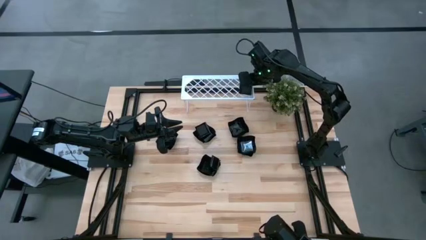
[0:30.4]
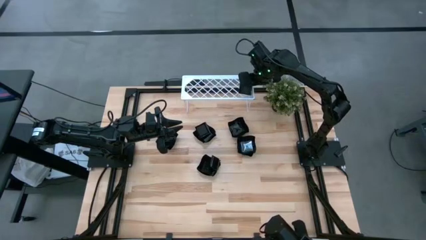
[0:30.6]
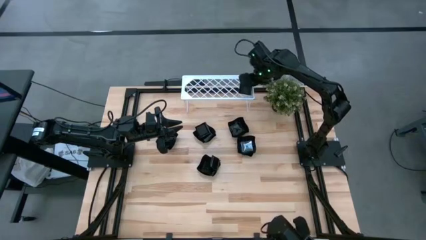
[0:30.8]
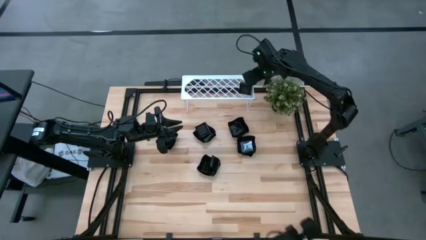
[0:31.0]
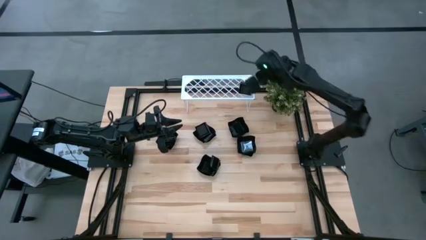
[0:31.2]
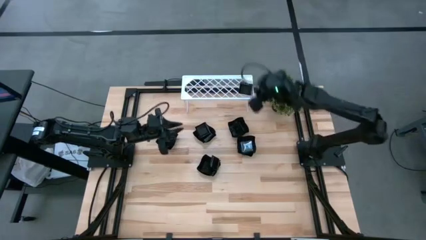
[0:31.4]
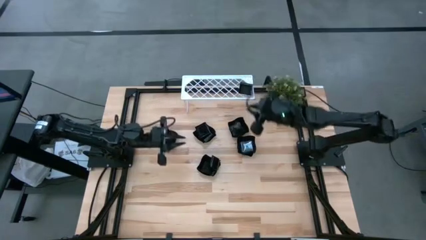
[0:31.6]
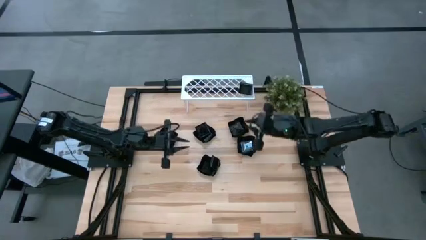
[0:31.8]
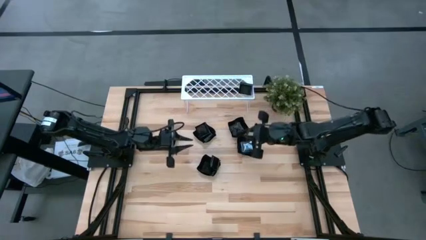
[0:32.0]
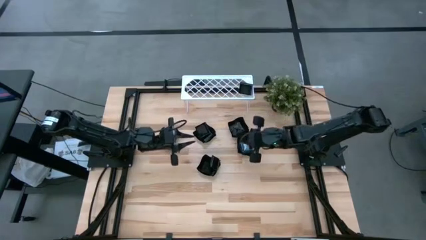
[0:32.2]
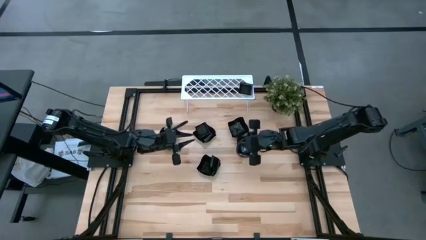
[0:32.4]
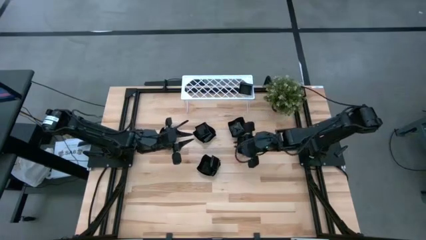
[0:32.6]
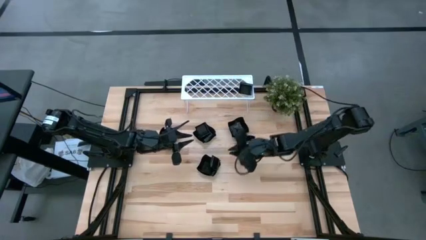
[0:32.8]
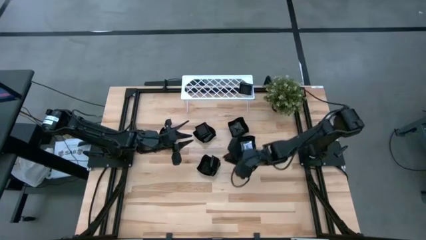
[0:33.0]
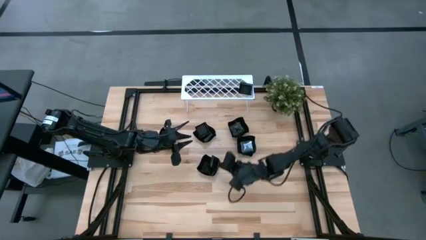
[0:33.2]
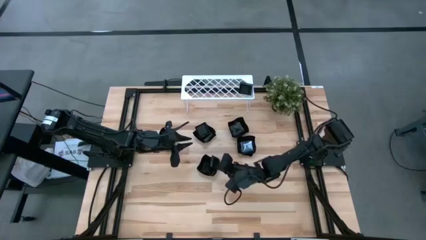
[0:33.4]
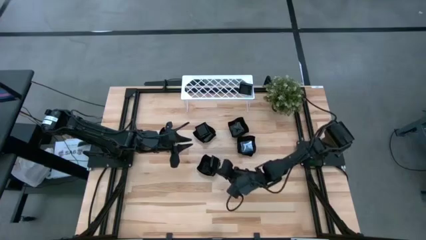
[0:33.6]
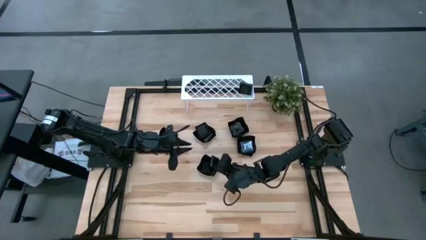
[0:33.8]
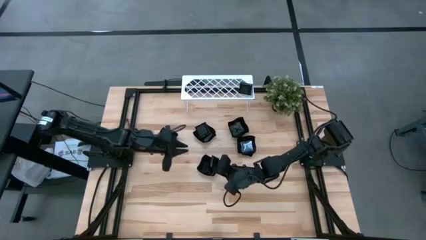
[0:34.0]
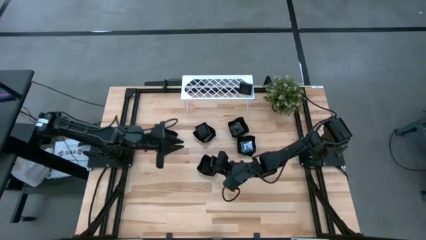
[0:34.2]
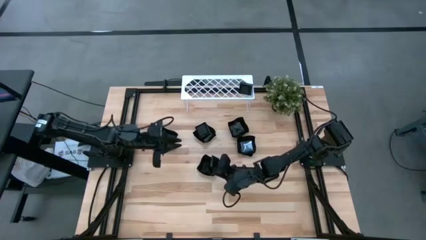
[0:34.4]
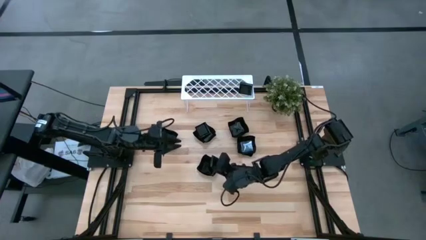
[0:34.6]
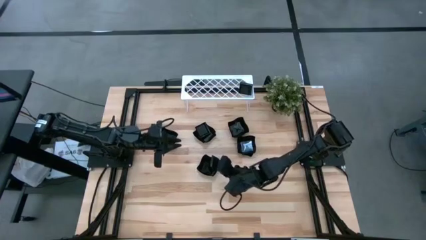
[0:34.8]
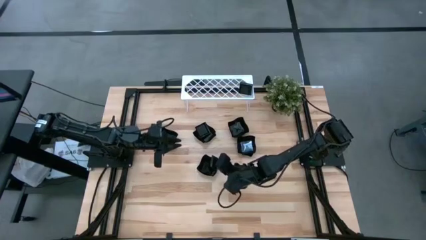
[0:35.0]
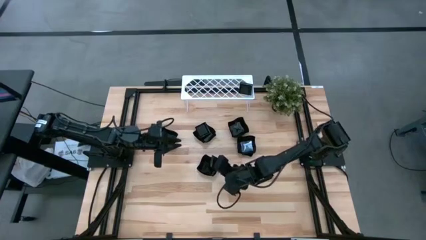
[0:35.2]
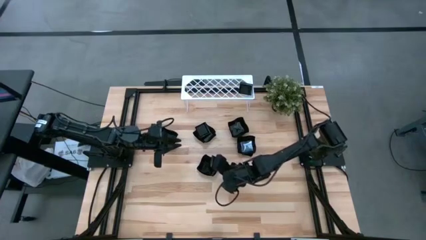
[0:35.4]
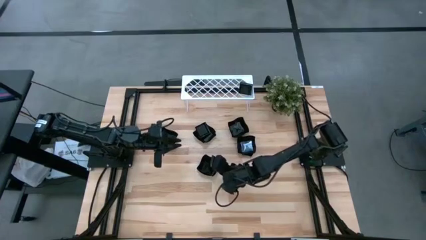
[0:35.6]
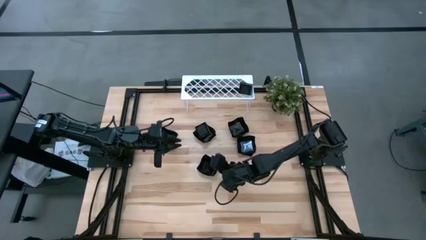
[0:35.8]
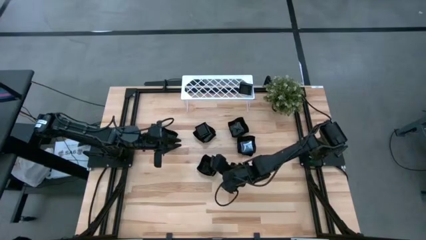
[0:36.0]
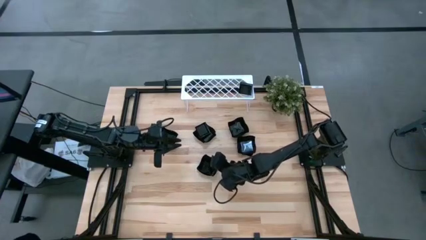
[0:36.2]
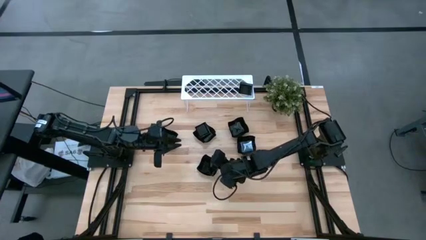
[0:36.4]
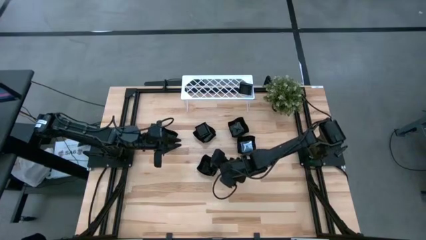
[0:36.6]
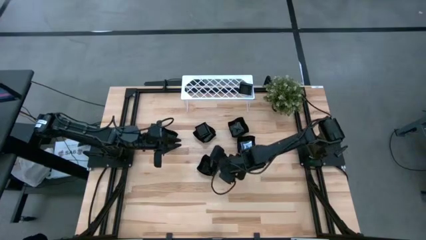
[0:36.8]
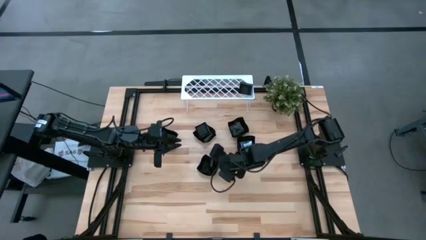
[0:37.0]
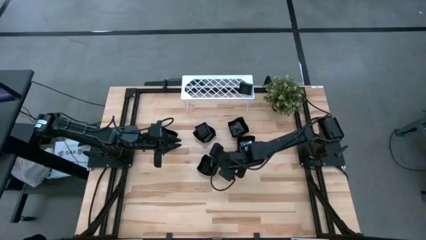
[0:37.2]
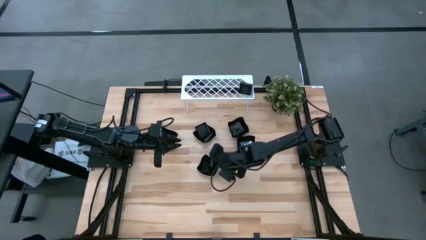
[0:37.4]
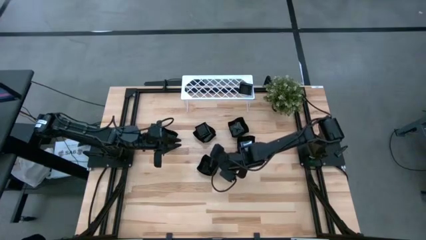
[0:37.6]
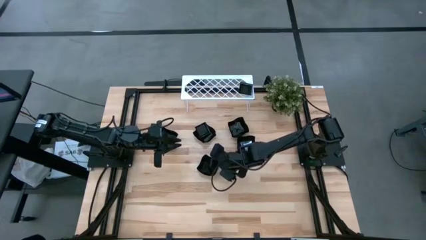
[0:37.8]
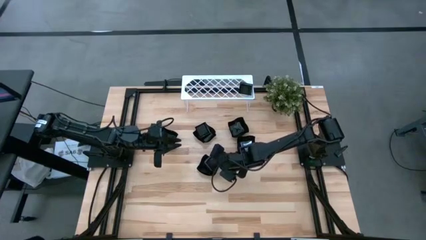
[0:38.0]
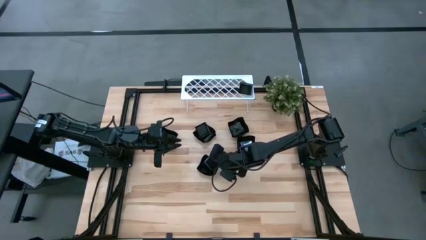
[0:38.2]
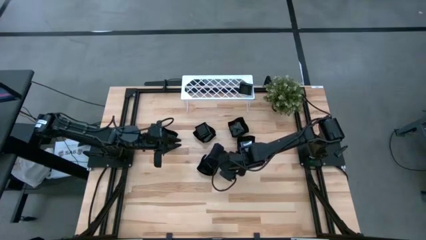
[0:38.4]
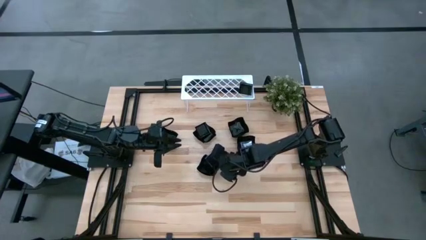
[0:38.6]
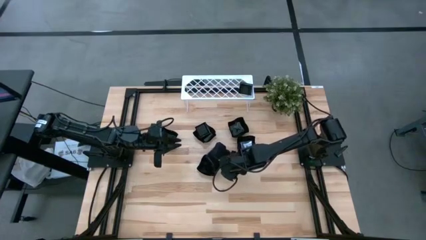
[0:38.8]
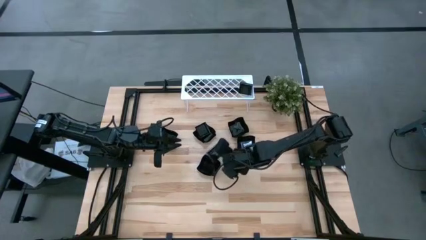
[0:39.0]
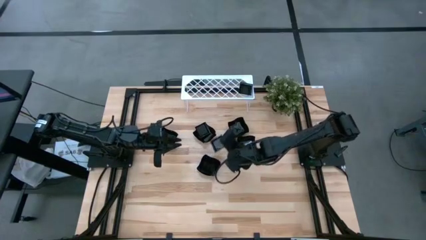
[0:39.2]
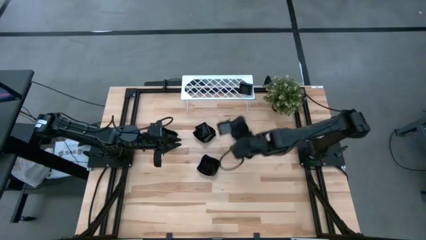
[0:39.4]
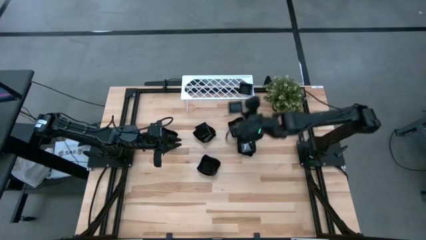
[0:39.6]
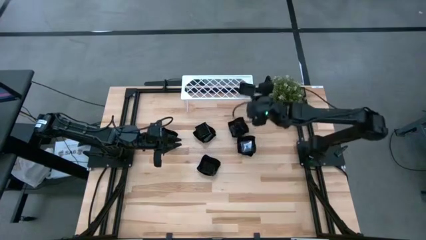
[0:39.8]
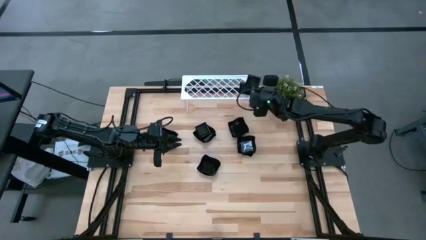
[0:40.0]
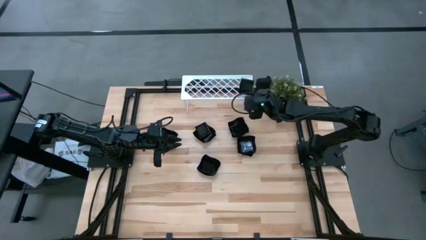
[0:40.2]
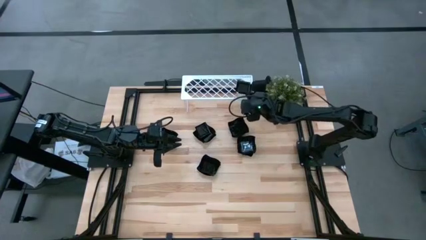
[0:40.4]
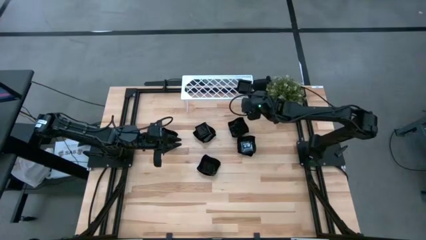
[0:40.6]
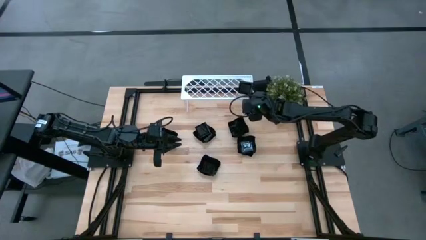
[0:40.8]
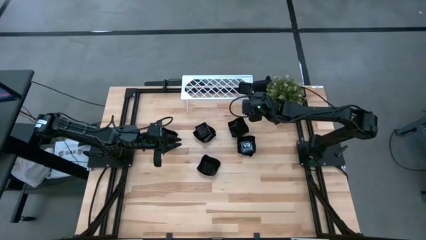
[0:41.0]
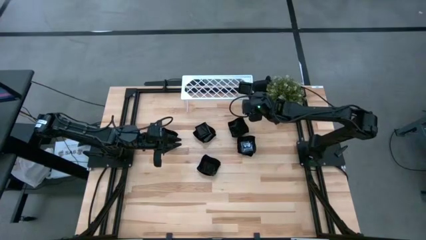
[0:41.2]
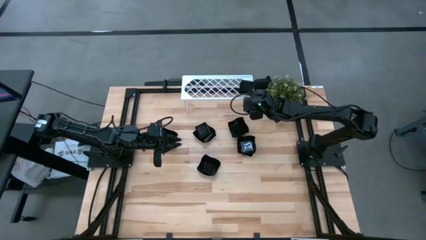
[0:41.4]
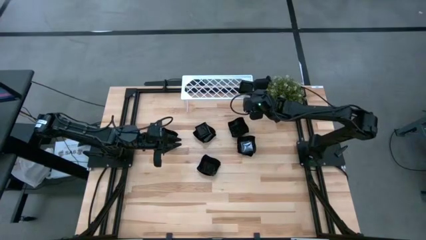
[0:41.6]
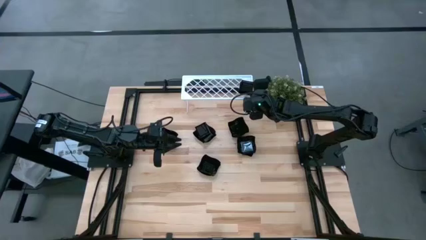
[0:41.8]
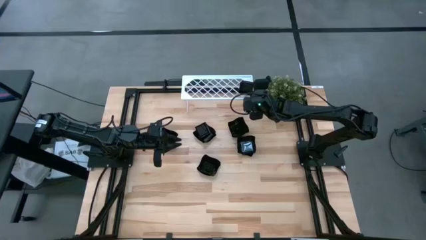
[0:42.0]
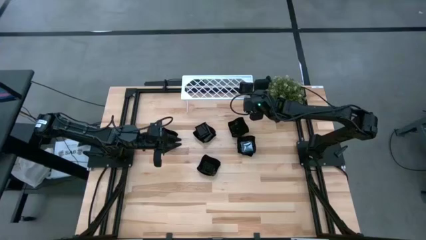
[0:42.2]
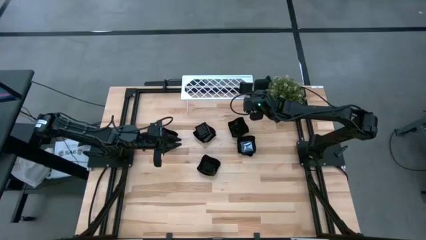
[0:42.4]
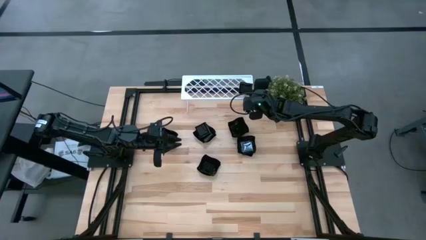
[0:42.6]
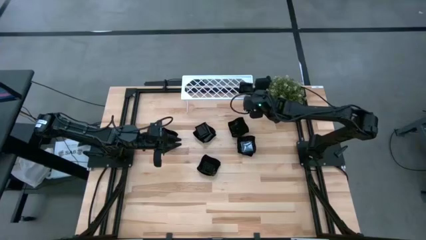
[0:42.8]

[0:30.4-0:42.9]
Task: Pick & Place Mini shaped plates
Stack the black square plate on top of the black square plate on the shelf
